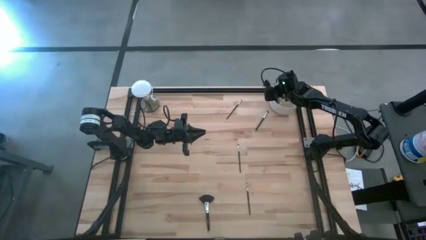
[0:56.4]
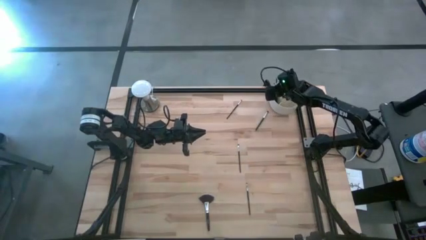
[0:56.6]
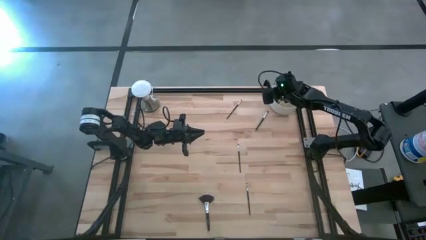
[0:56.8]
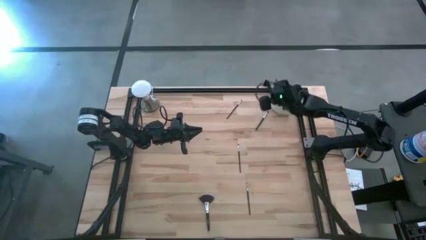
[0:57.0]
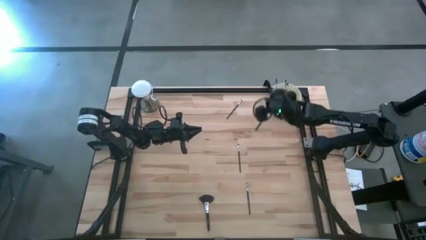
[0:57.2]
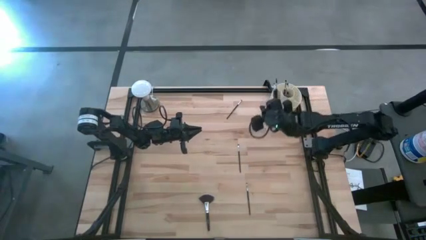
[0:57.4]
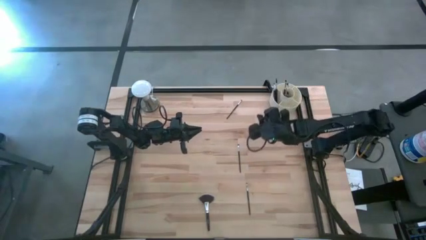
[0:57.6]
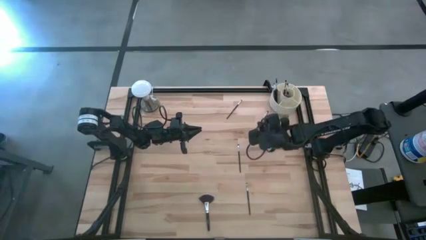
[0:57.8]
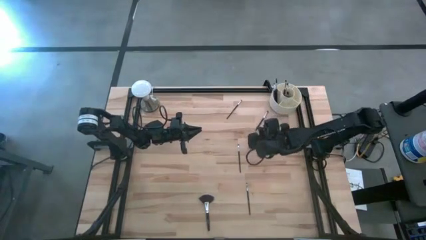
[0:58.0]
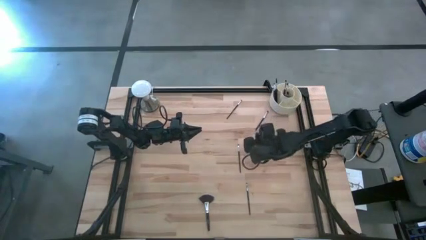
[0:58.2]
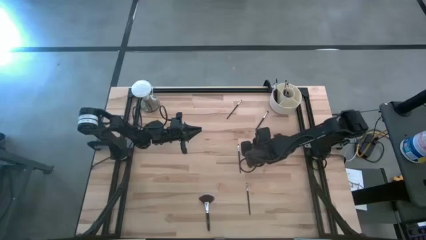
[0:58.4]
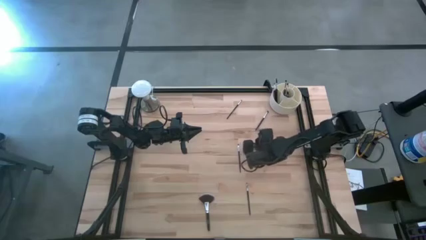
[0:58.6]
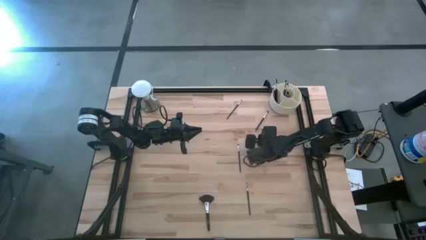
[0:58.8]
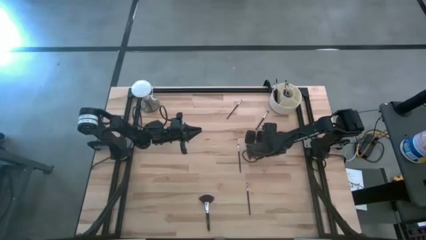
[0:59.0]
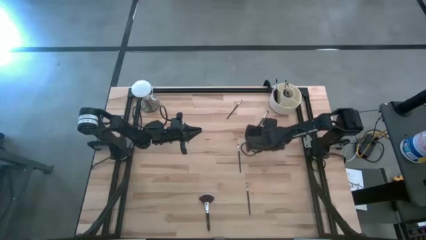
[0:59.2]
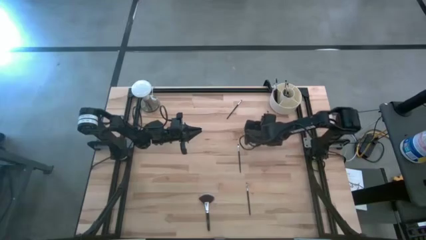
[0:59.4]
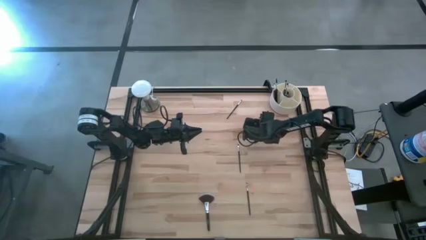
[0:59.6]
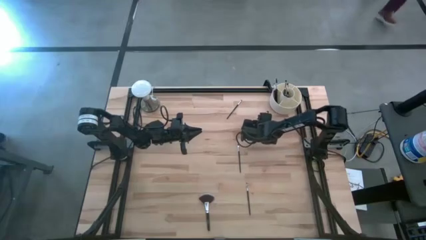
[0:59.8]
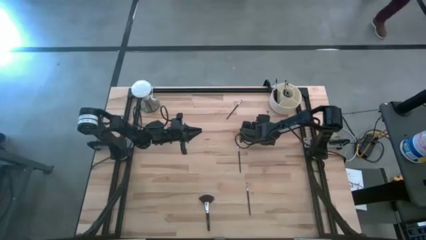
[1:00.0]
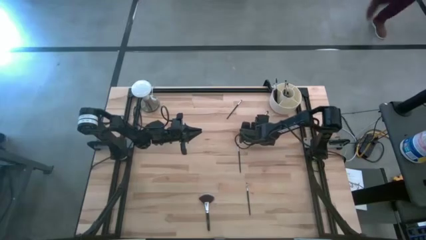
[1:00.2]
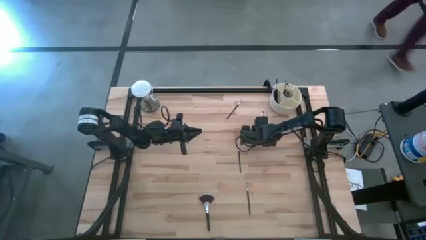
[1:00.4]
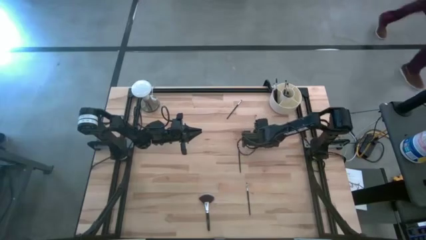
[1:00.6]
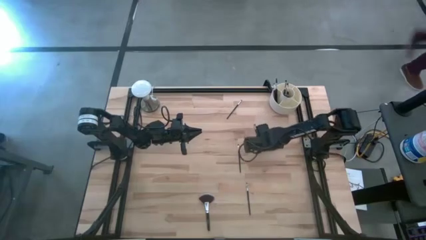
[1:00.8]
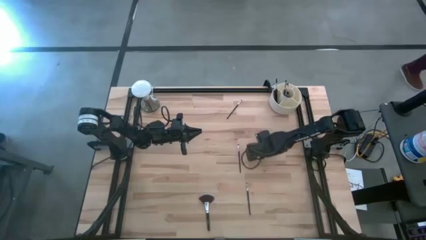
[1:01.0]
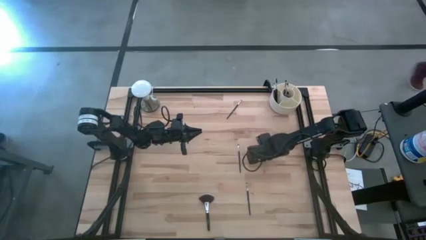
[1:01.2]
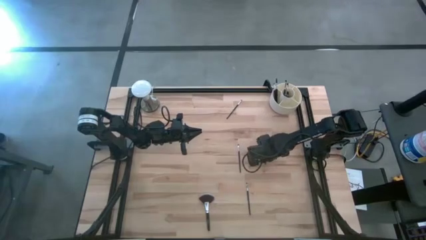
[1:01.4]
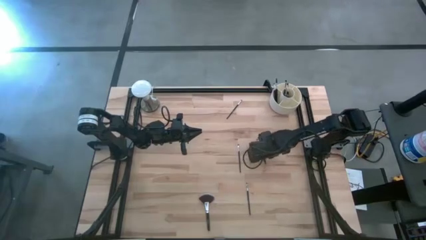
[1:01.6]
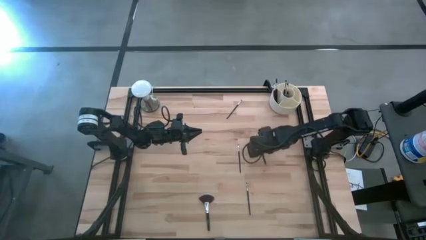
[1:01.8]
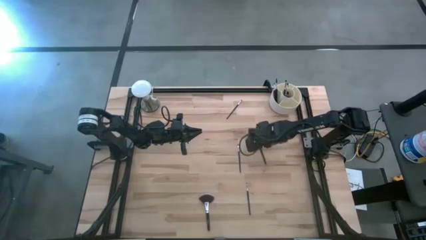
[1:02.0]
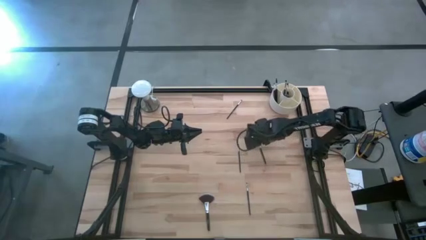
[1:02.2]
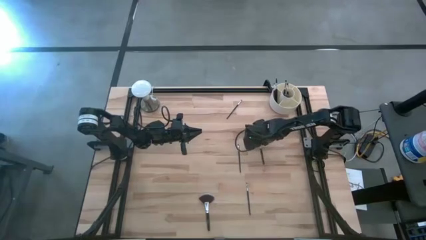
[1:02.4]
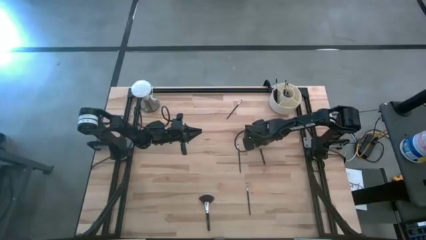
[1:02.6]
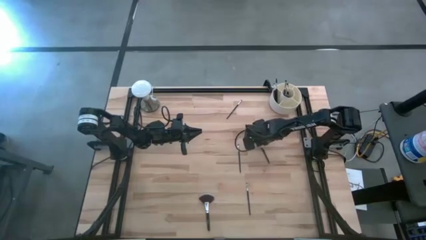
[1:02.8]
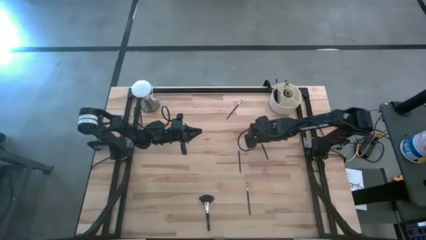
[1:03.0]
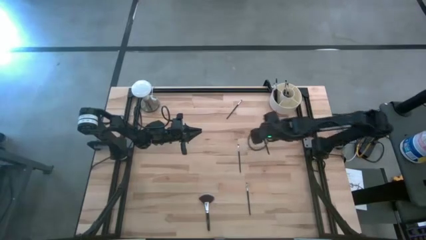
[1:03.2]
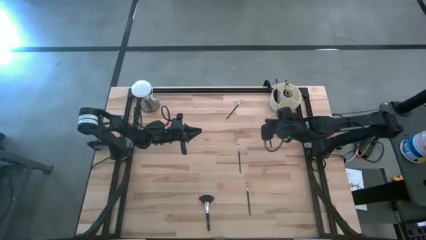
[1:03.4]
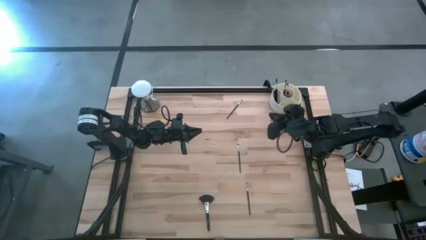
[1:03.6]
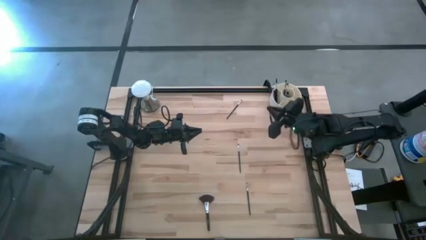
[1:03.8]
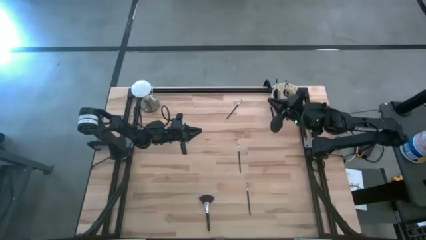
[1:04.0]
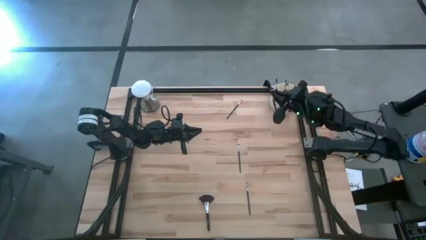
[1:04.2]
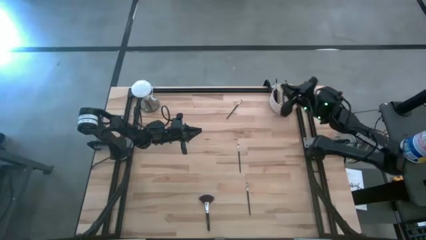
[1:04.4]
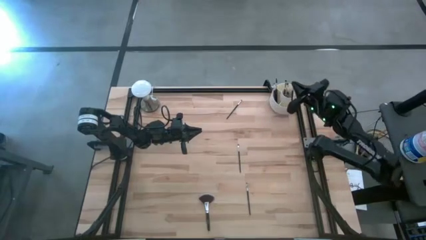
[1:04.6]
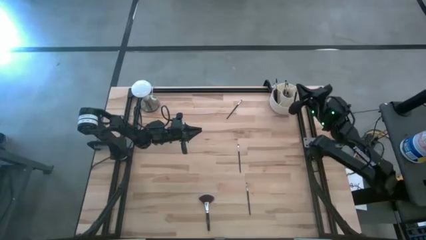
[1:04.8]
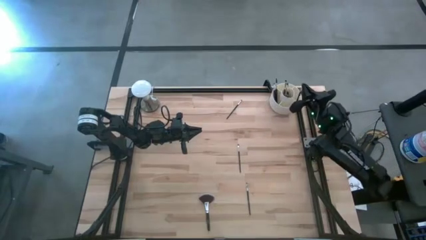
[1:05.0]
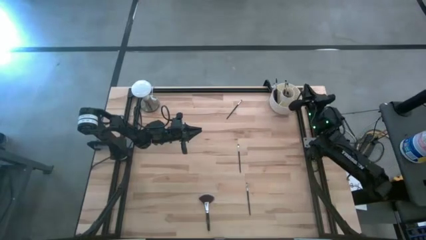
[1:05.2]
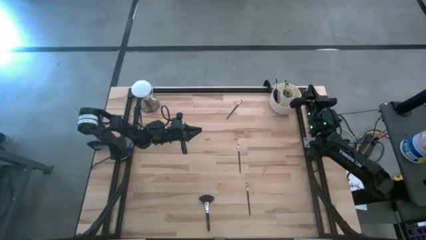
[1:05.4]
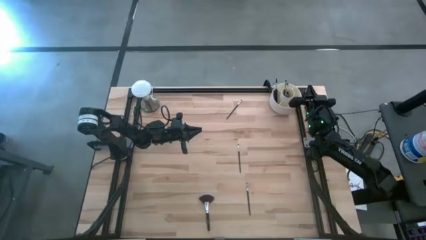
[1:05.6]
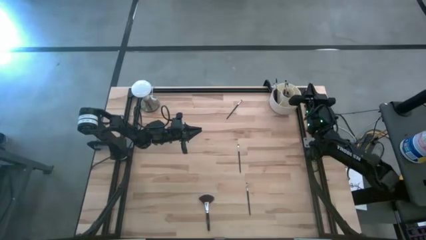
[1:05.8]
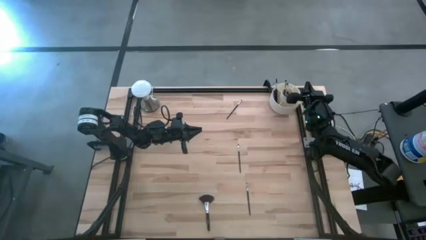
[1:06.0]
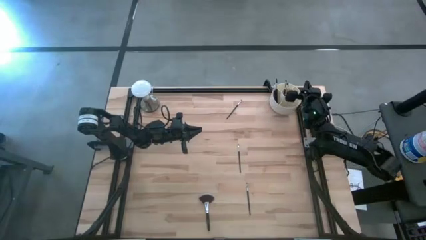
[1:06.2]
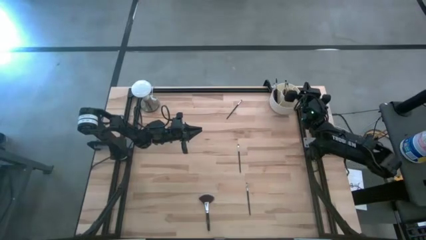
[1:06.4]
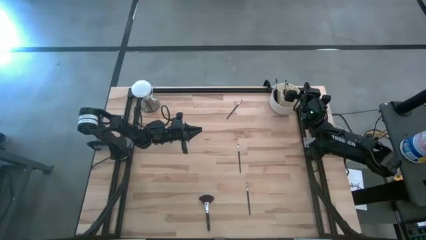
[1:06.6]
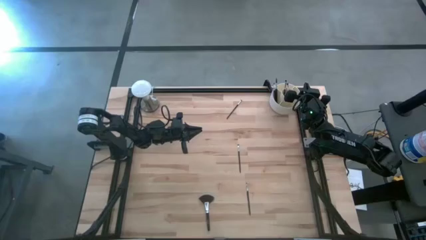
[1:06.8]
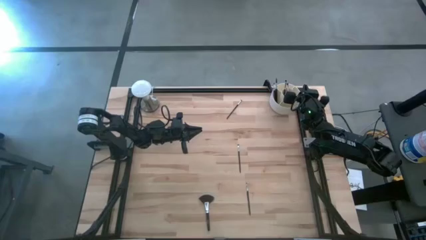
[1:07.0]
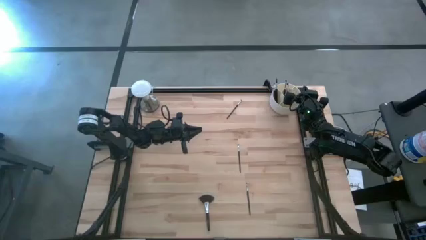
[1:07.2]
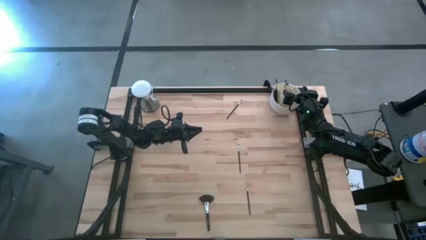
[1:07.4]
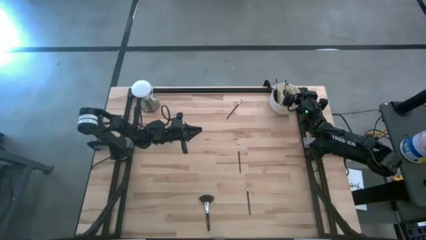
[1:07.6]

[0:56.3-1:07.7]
Task: Pick & Place Makeup Brushes
Put the black foundation brush into the white makeup holder
